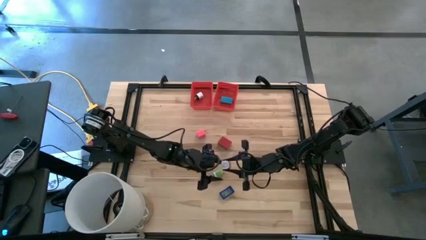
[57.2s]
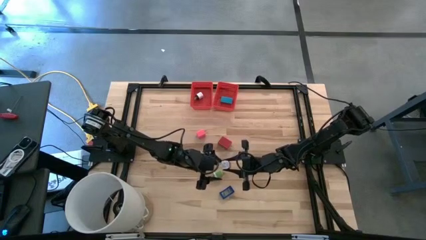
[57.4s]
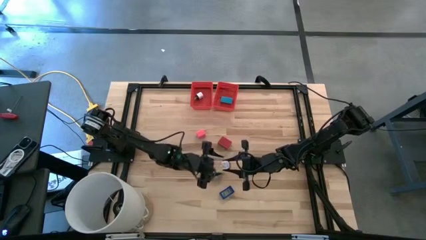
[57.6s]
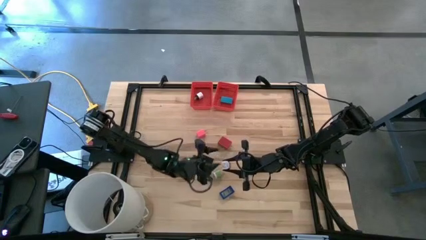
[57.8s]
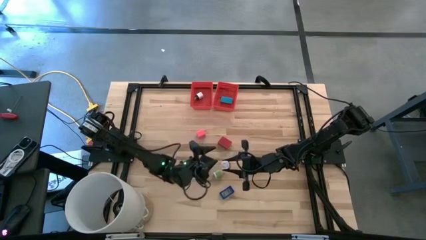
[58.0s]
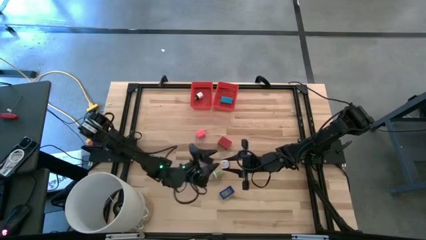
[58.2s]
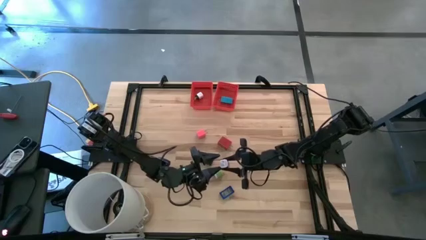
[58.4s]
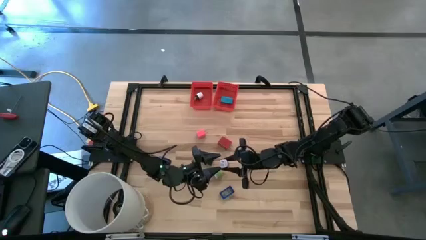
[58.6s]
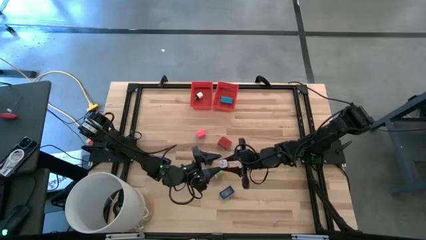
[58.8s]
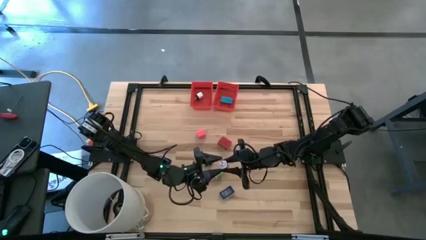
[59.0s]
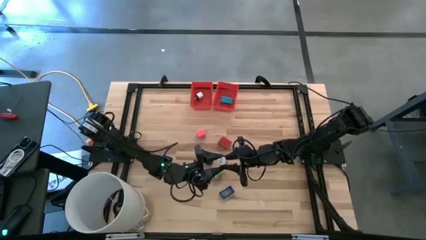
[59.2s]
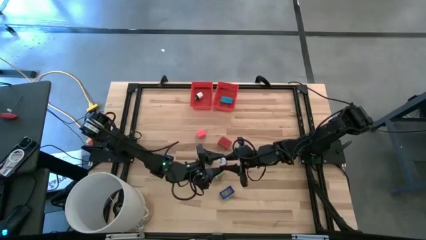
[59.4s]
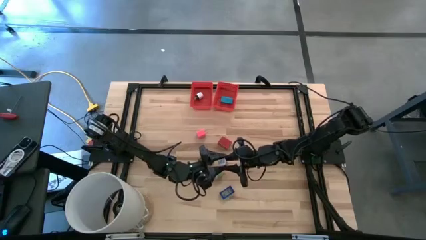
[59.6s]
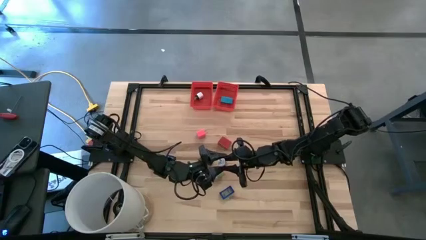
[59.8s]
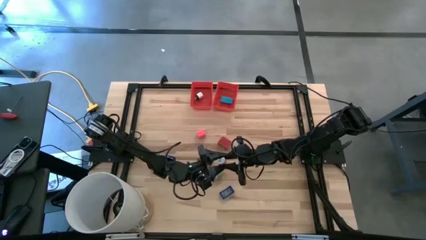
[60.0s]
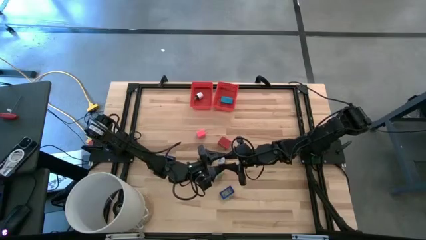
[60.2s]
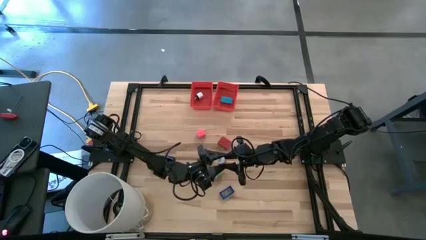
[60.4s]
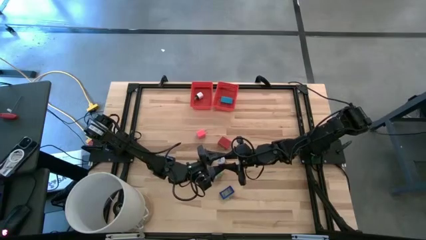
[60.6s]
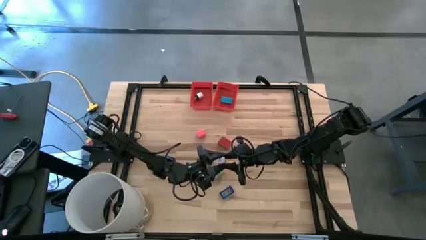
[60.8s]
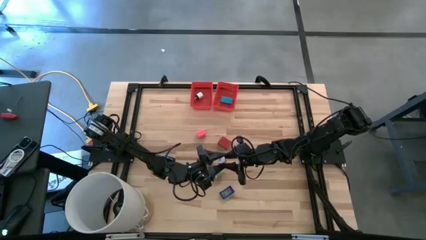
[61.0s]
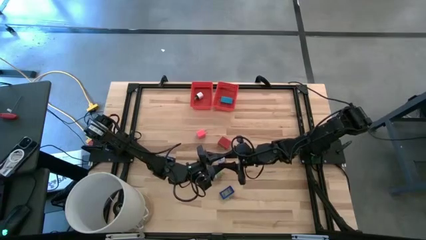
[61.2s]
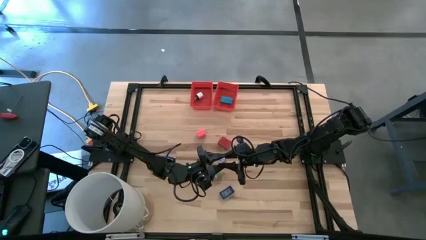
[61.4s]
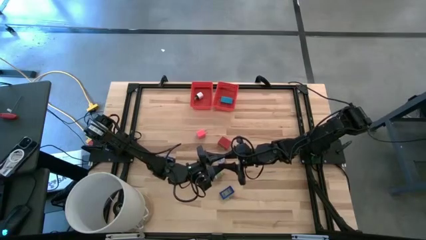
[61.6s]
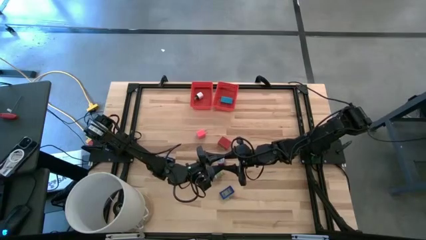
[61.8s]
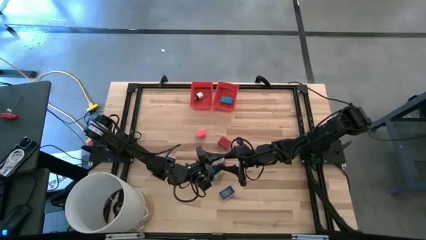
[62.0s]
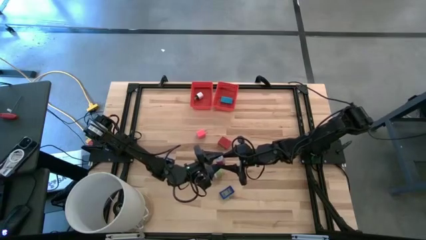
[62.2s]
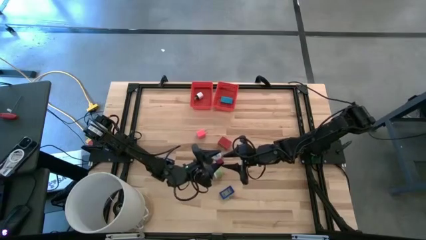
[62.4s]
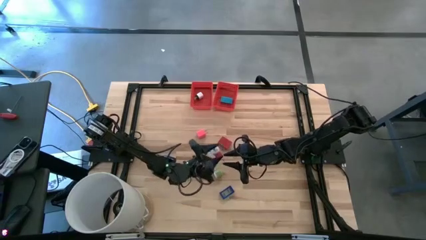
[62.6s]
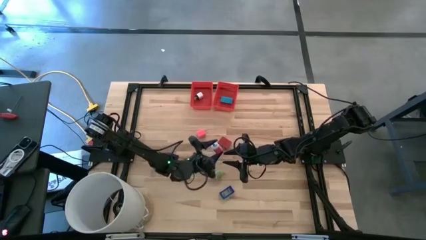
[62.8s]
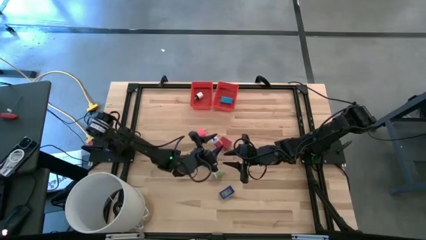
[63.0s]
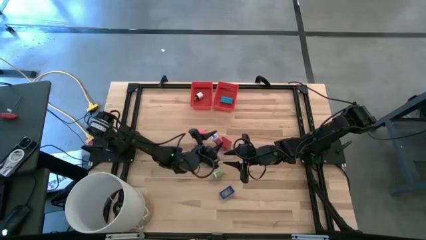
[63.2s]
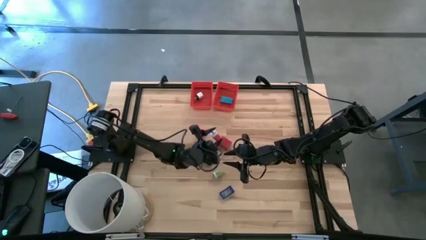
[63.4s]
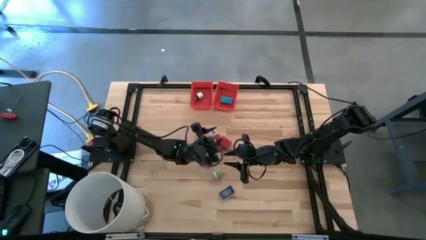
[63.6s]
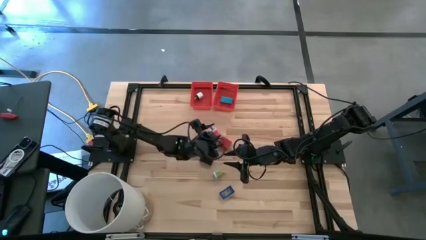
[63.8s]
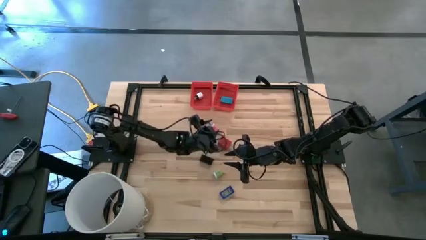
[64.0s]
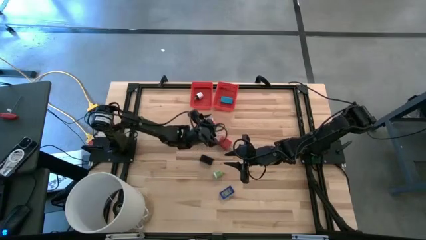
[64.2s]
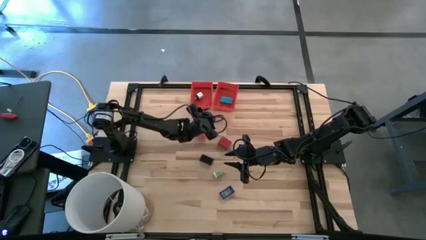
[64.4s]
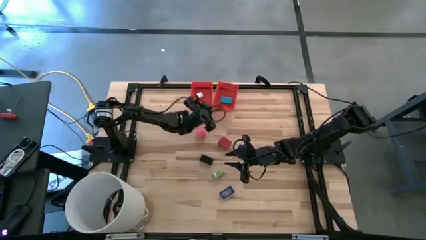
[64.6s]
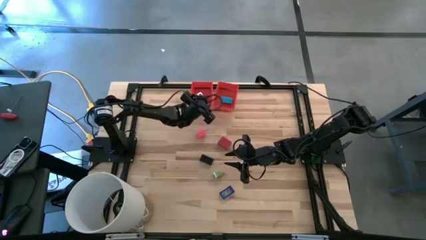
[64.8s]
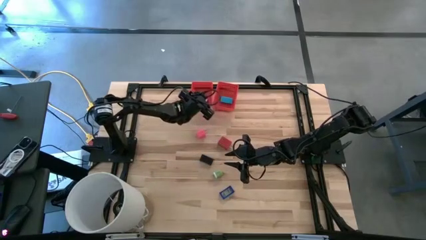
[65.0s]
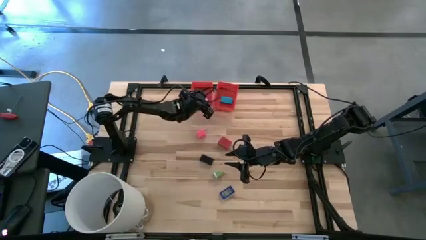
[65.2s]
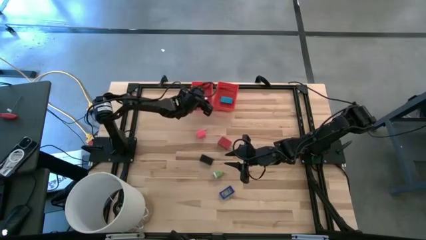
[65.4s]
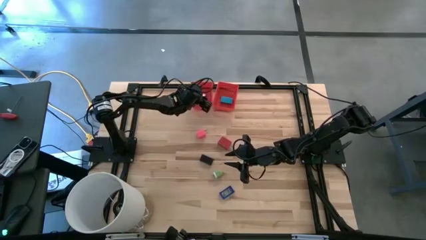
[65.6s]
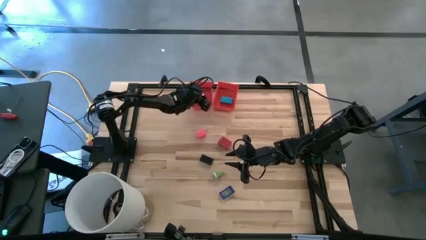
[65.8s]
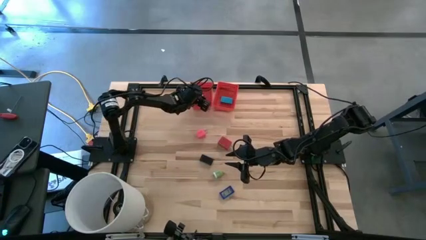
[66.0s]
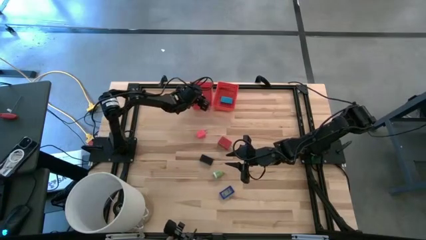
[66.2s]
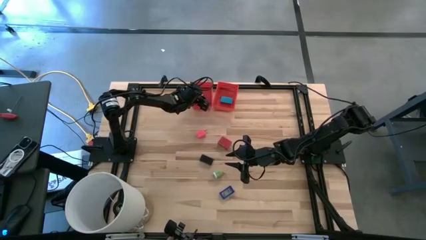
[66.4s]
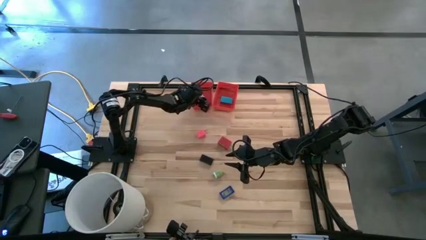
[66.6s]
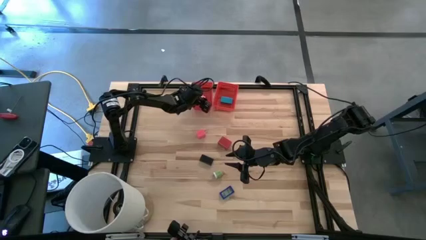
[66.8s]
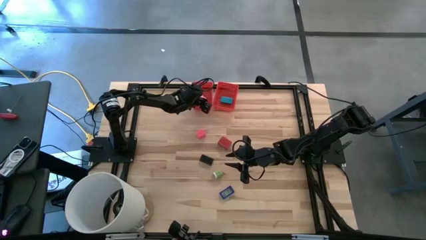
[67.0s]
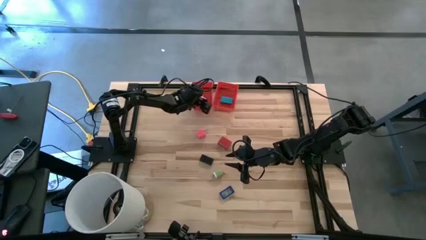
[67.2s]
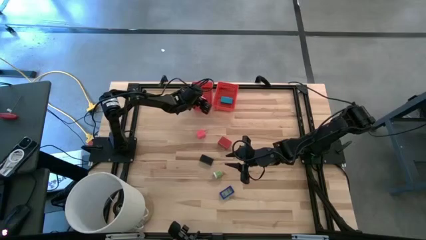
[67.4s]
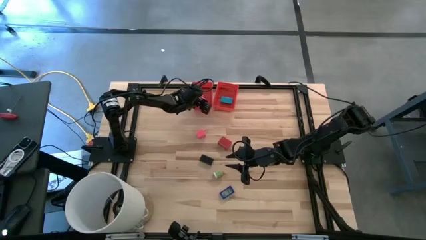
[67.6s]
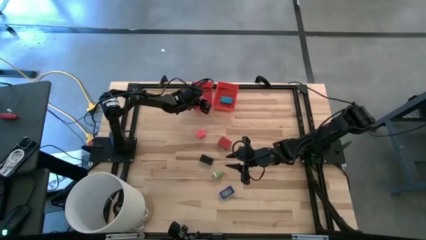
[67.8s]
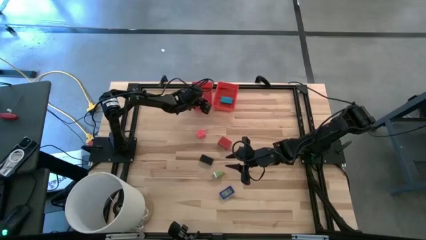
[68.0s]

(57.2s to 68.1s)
Task: Pick & Place Office items
Put the right pink charger adapter into the left red basket

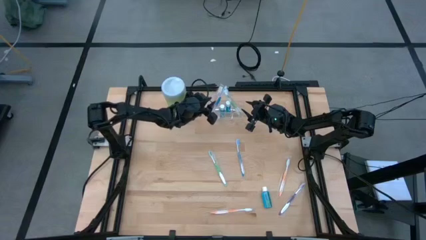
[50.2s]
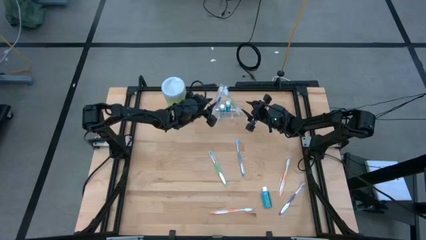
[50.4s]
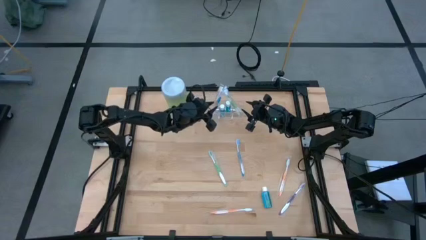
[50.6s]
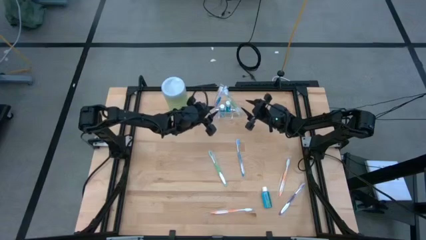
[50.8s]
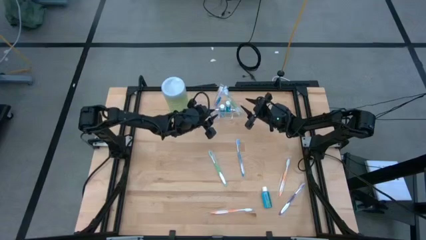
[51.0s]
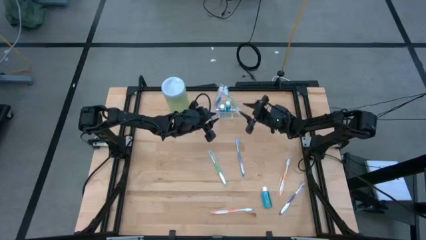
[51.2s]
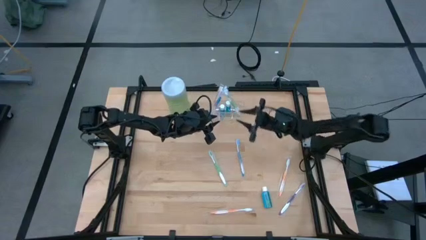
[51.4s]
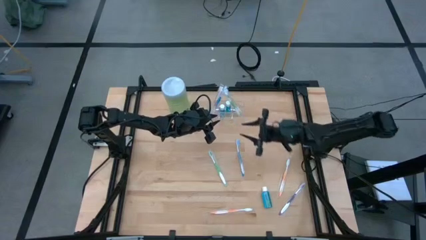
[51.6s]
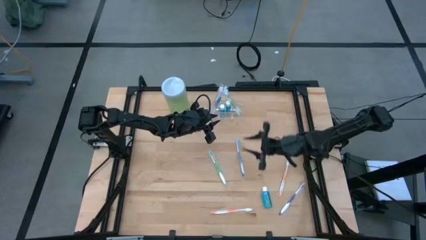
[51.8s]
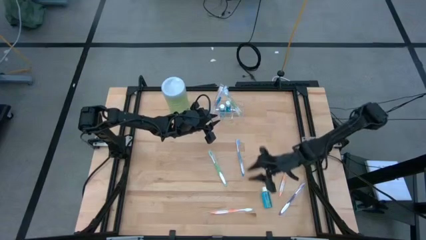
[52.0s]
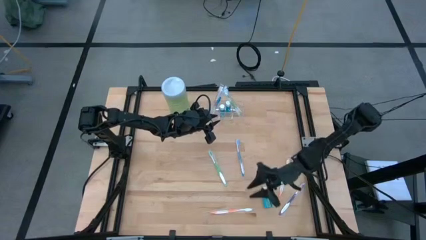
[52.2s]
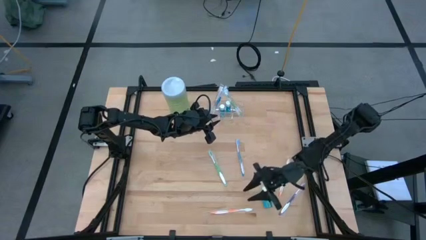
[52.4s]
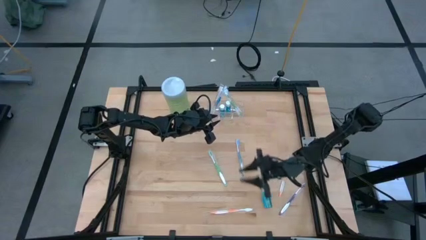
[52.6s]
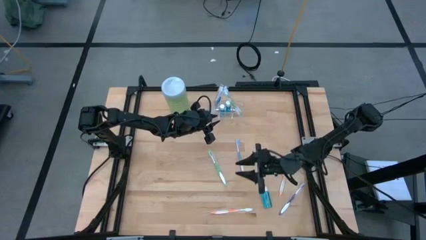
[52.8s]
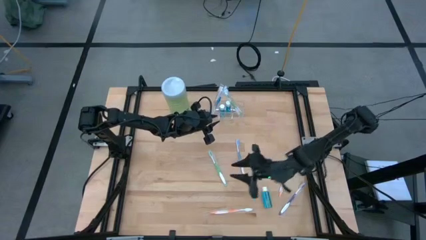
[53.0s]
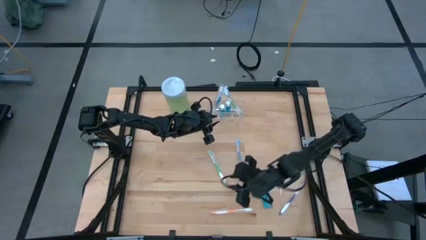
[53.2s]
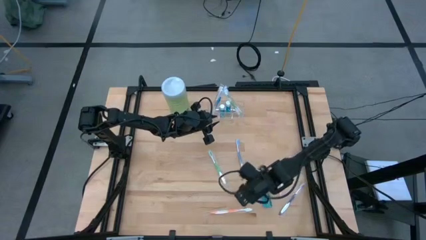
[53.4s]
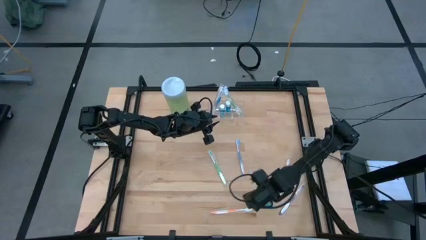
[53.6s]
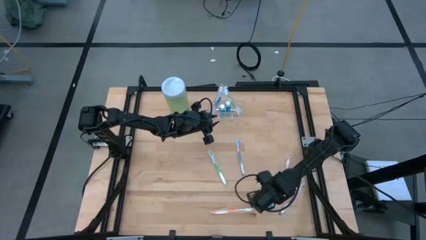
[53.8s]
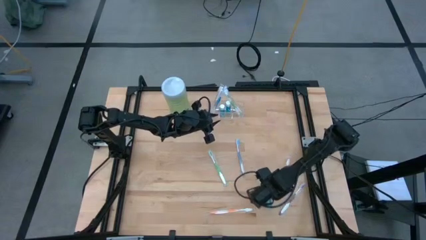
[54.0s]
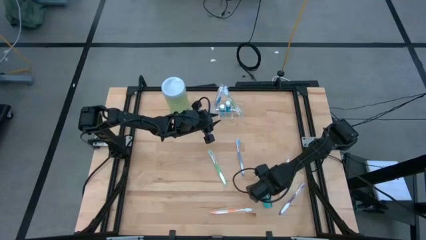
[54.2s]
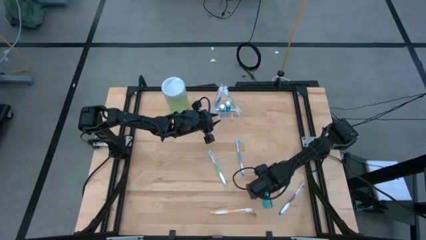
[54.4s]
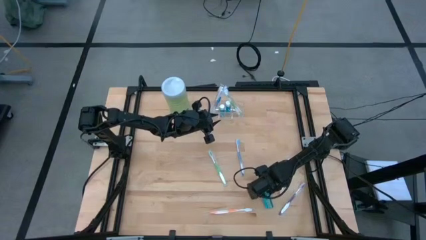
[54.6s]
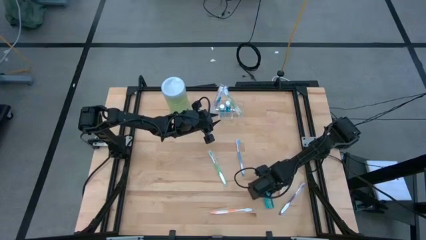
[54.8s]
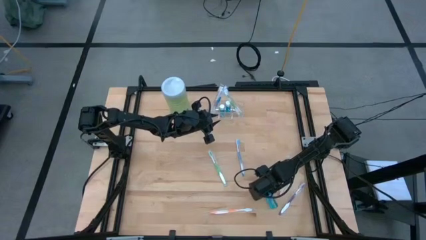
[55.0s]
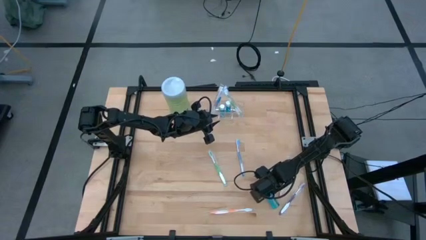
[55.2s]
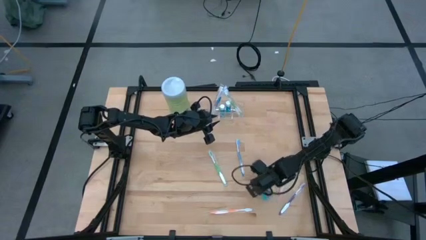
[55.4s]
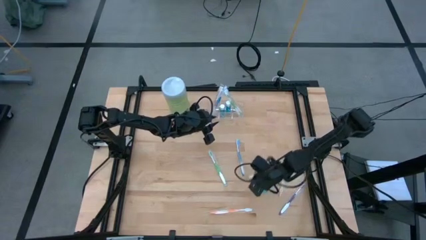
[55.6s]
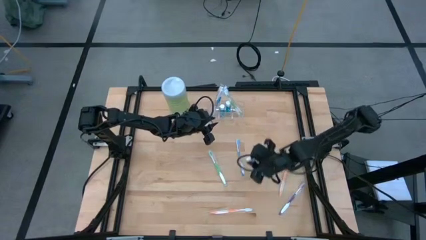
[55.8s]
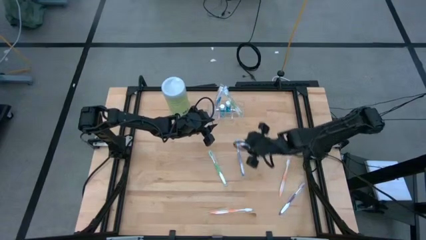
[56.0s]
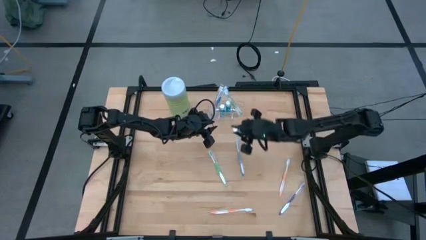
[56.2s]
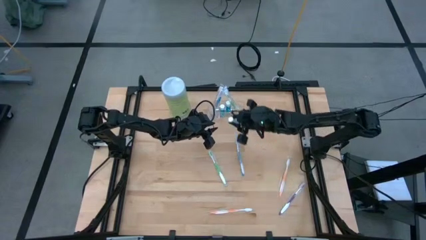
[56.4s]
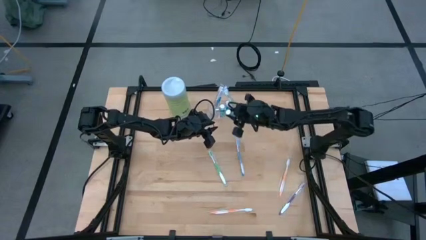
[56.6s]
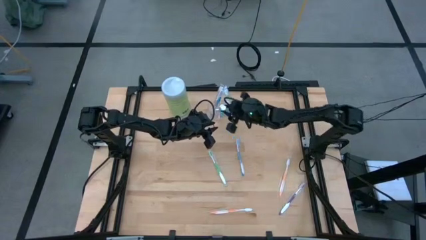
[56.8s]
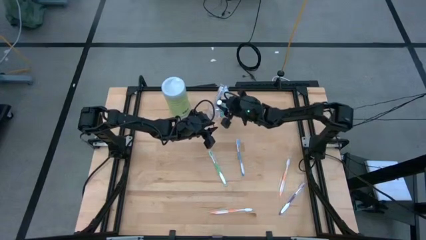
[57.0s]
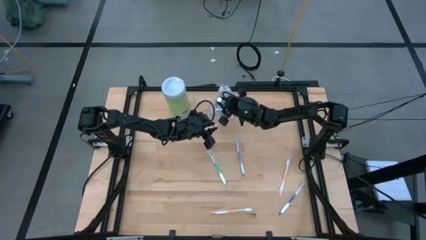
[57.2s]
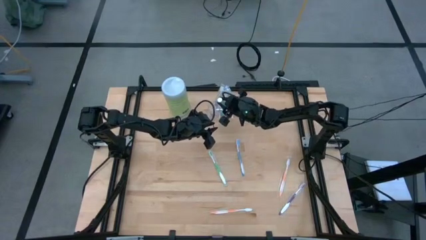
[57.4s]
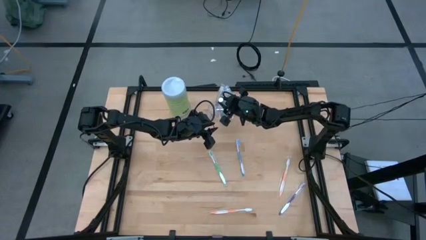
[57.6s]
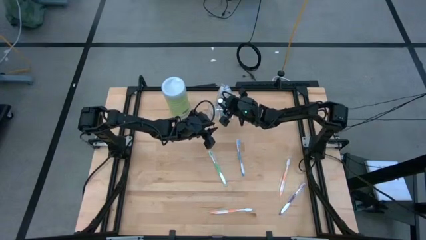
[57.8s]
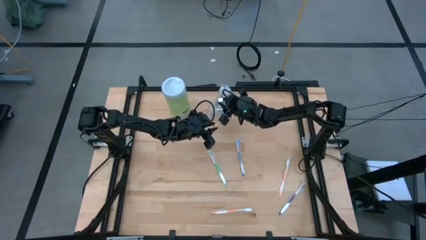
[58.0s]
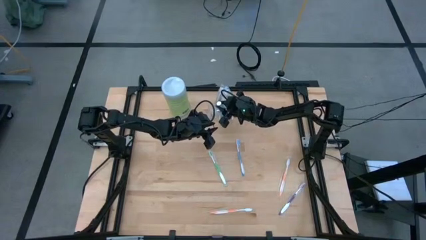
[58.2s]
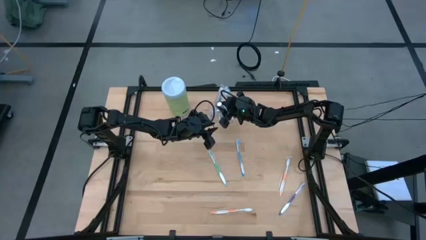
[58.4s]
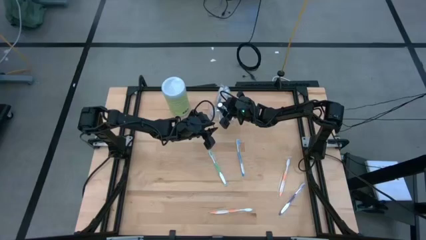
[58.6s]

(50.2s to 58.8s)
Task: Pick & Place toothbrushing station
Put the mouthwash bottle into the transparent organizer
